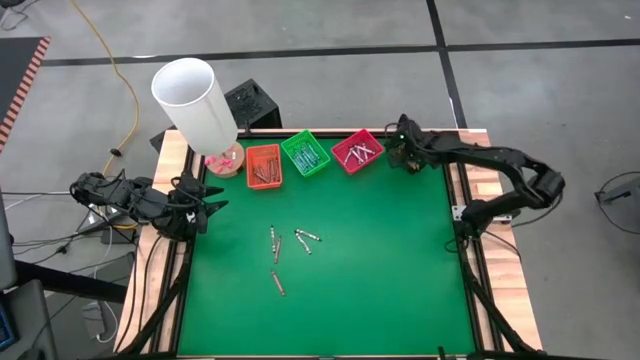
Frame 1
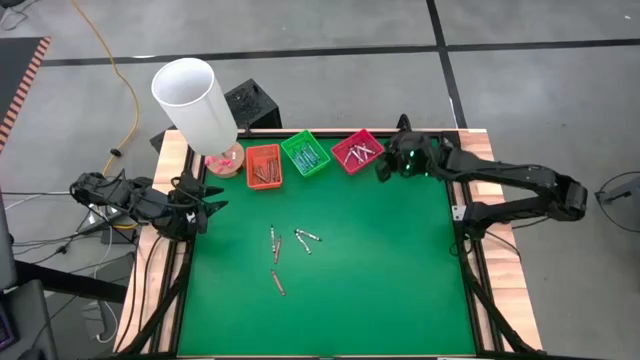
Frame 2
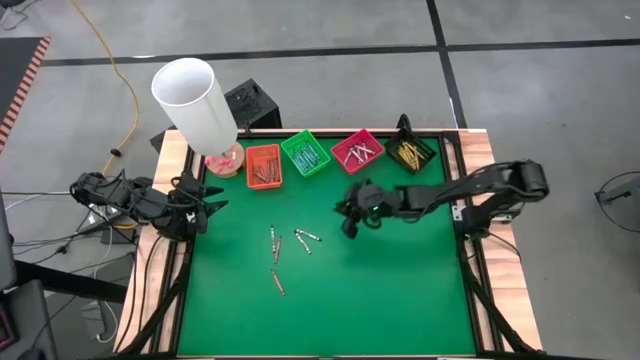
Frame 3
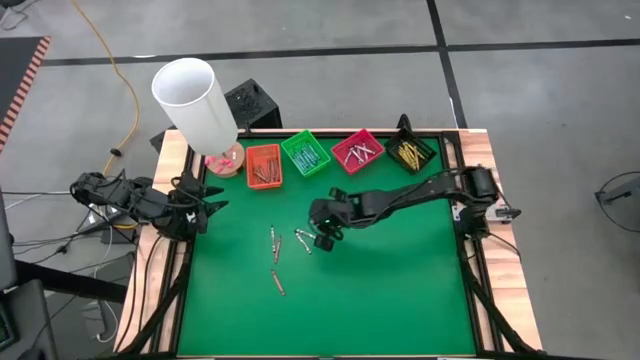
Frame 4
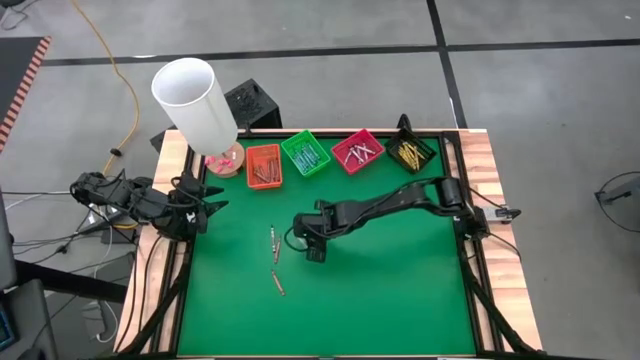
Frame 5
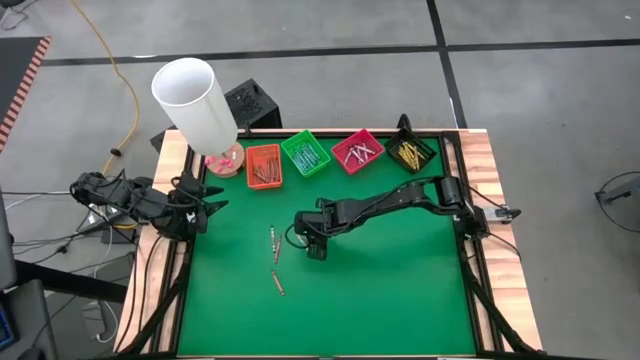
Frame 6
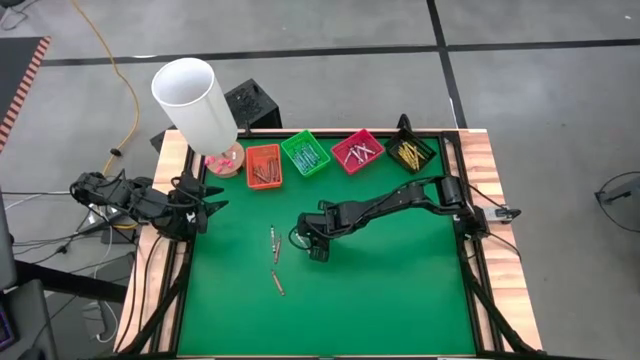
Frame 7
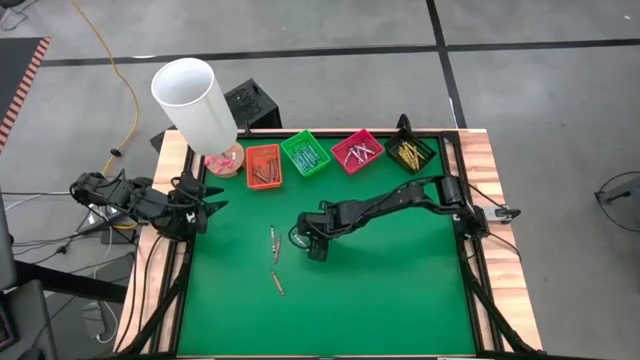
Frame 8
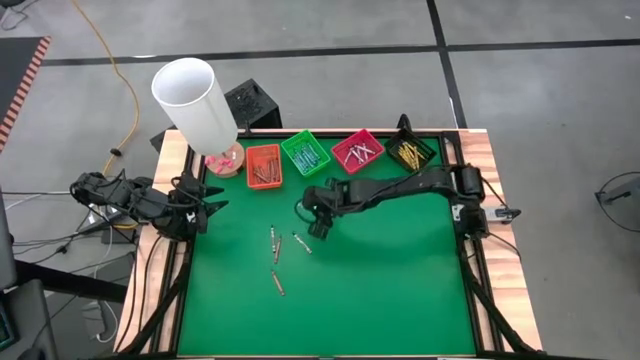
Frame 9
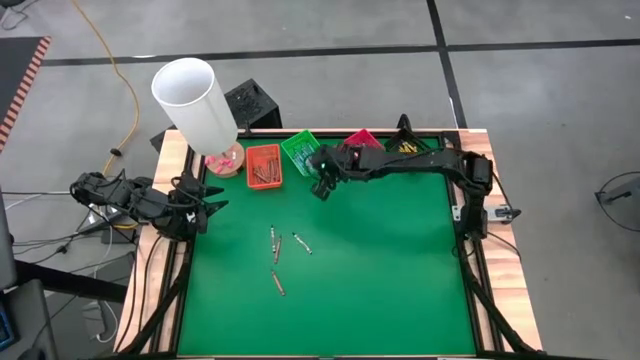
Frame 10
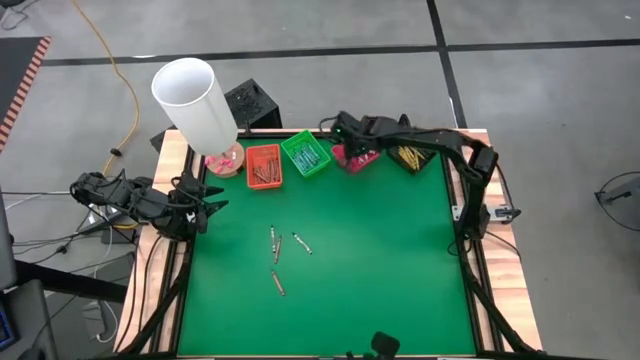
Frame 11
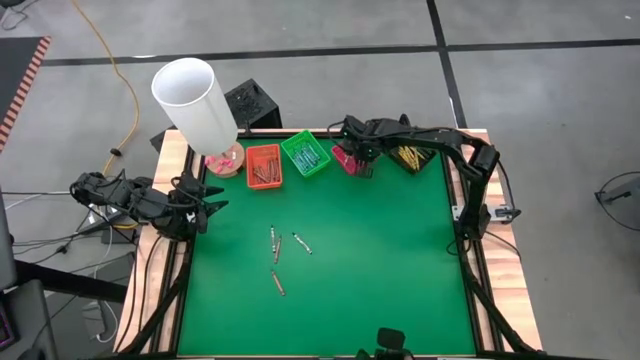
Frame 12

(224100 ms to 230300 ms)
Task: Sort crayons
Put the black crayon into the red bin

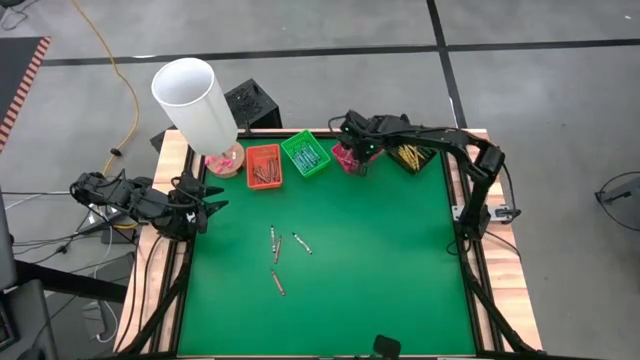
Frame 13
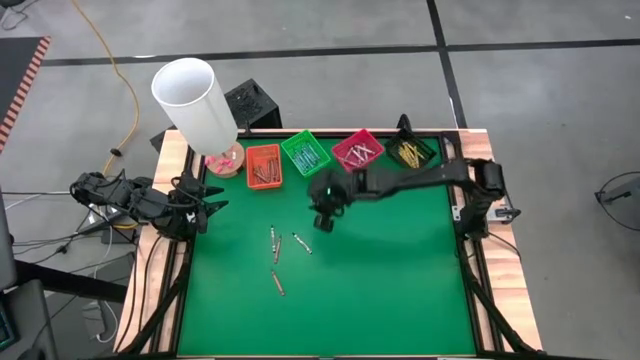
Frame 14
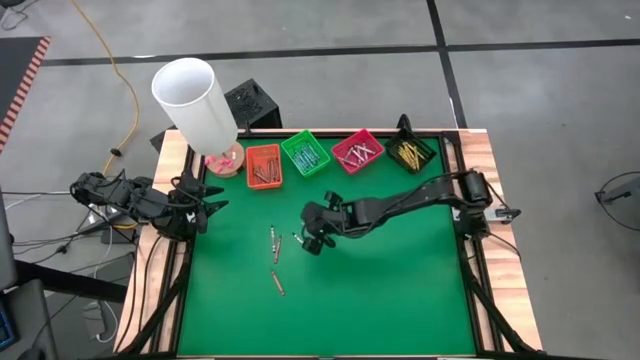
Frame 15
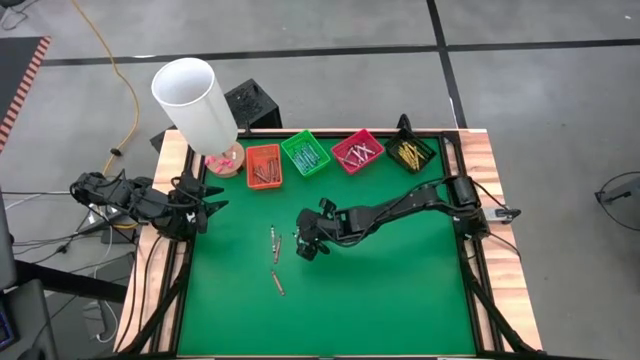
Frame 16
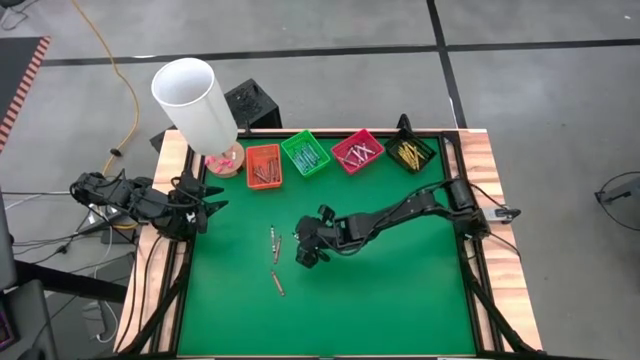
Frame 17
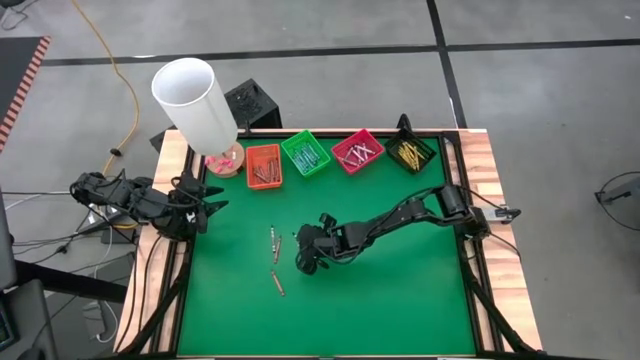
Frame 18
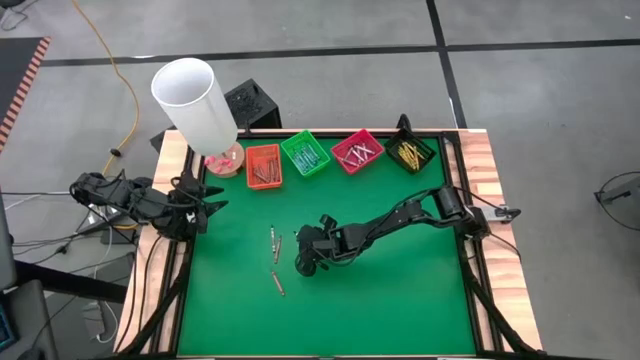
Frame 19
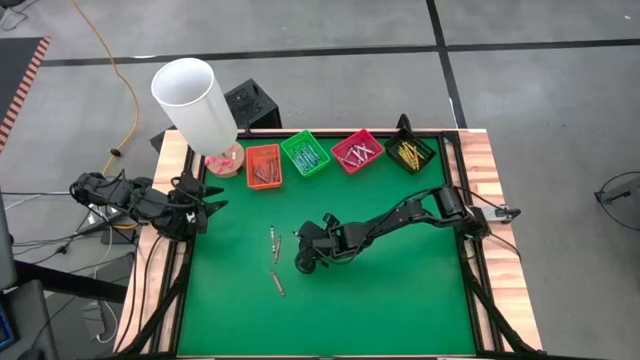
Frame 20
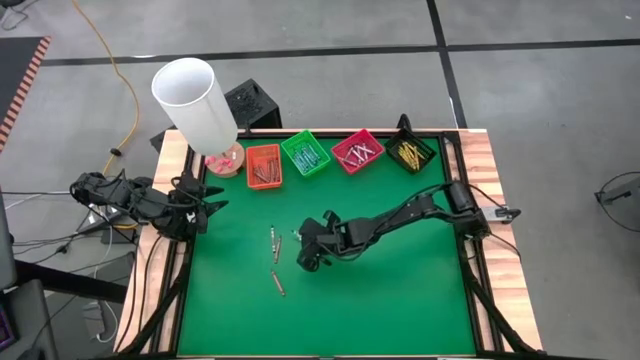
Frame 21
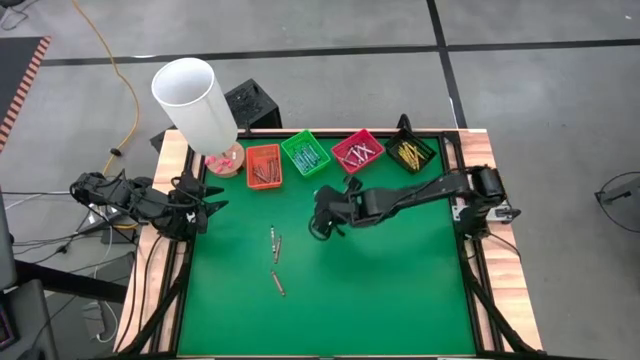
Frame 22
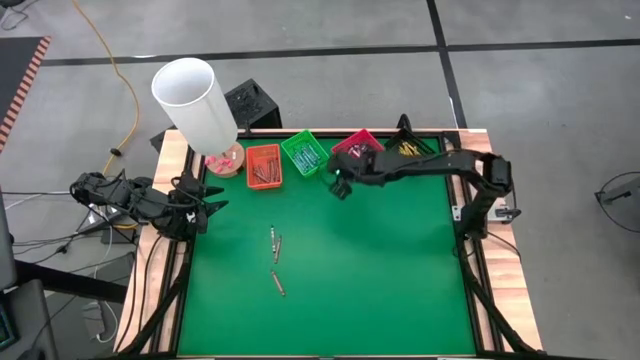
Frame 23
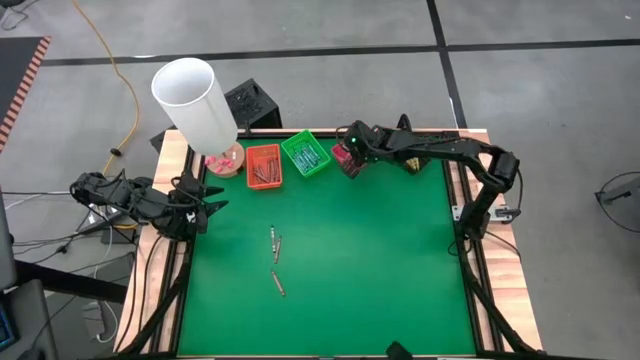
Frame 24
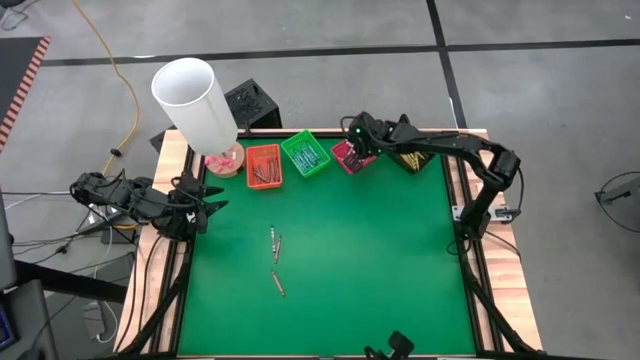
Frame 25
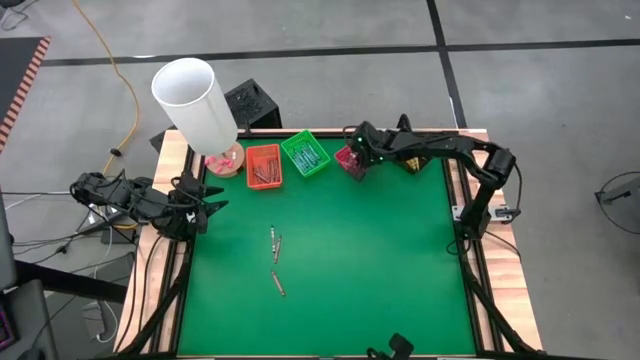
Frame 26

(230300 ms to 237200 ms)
Put the black crayon into the red bin

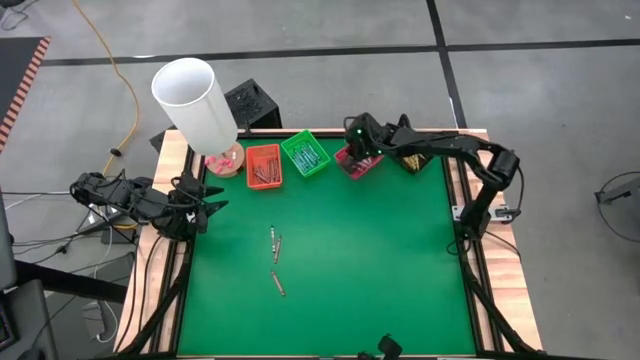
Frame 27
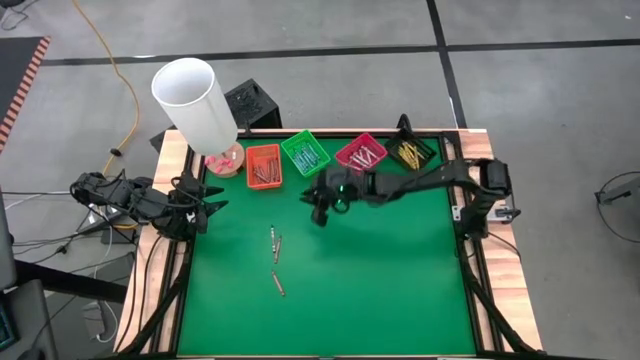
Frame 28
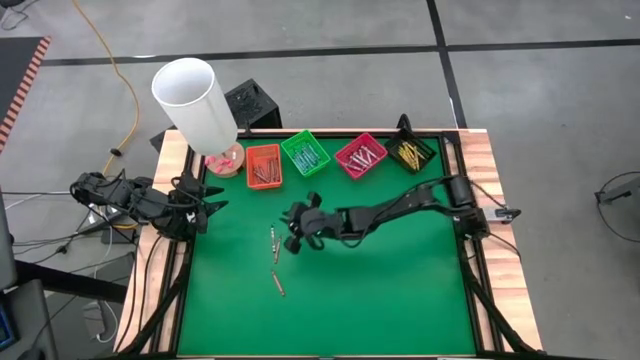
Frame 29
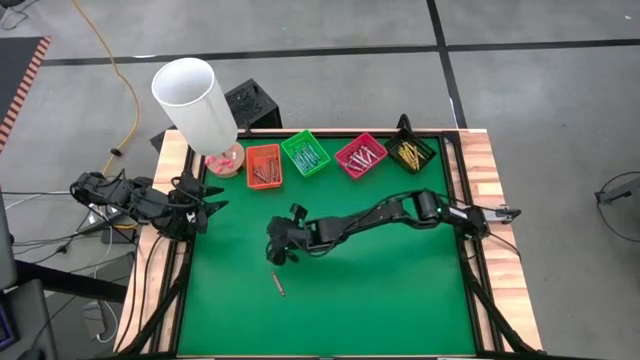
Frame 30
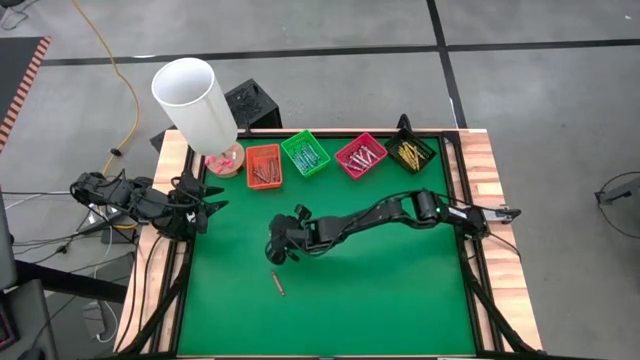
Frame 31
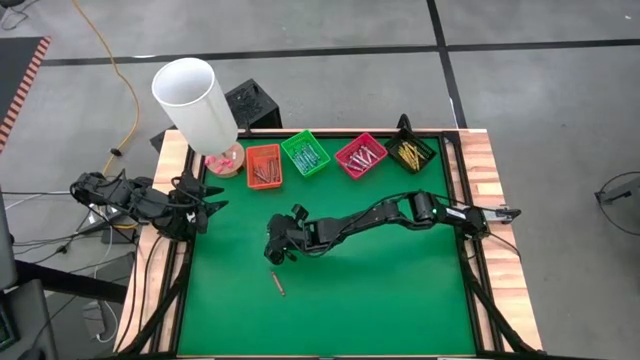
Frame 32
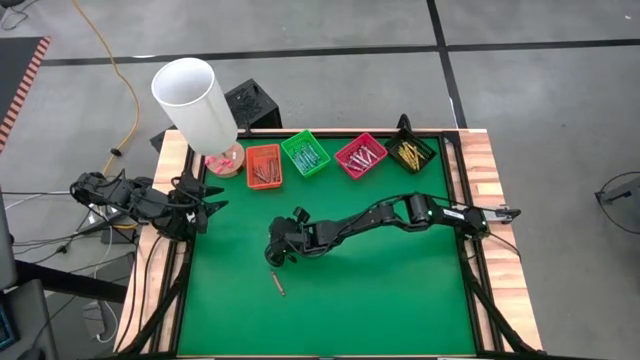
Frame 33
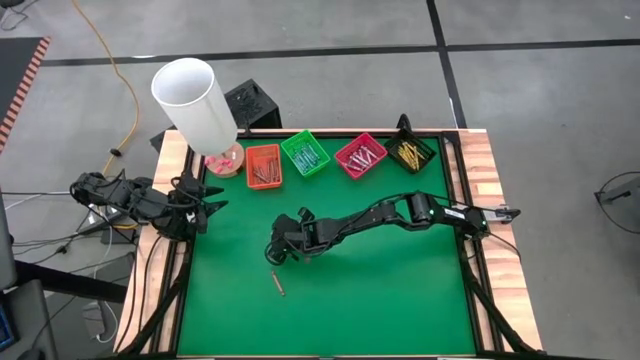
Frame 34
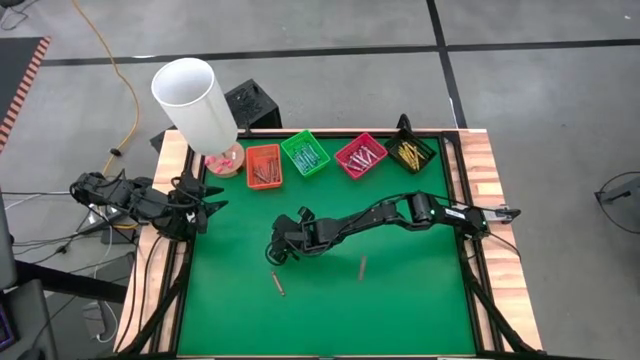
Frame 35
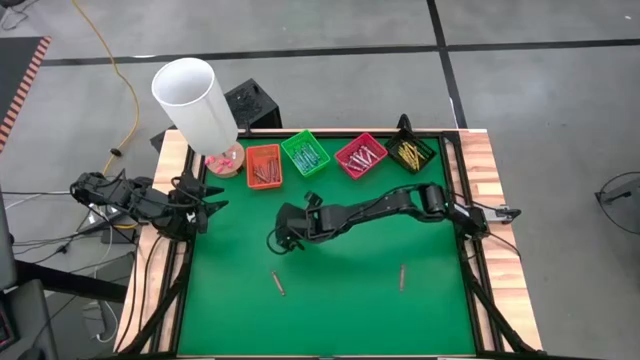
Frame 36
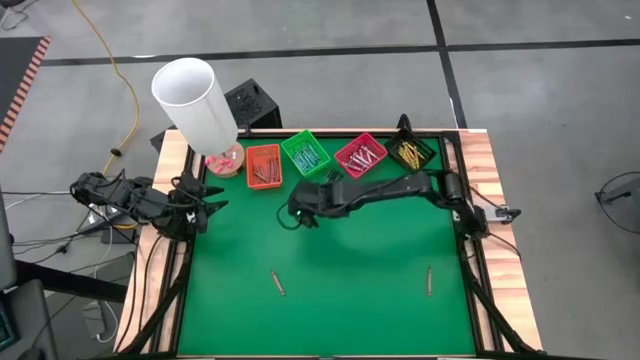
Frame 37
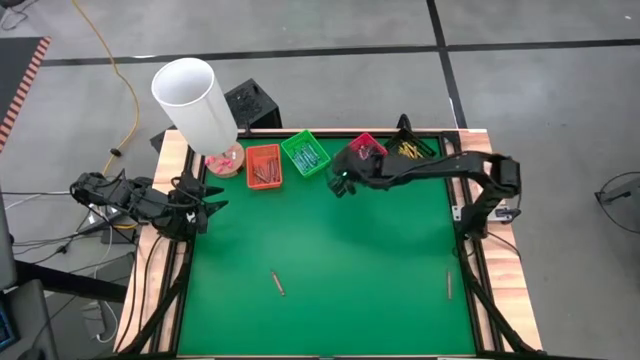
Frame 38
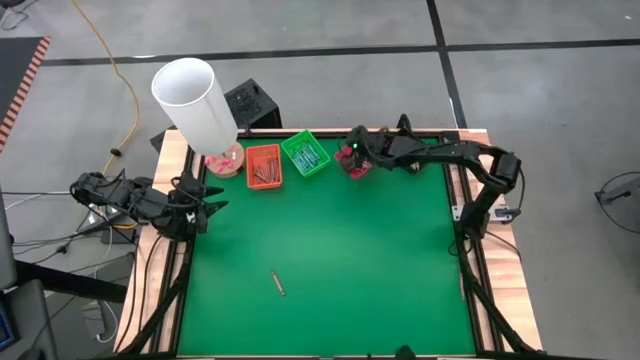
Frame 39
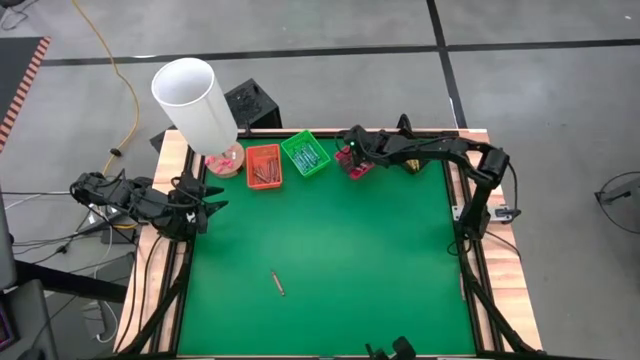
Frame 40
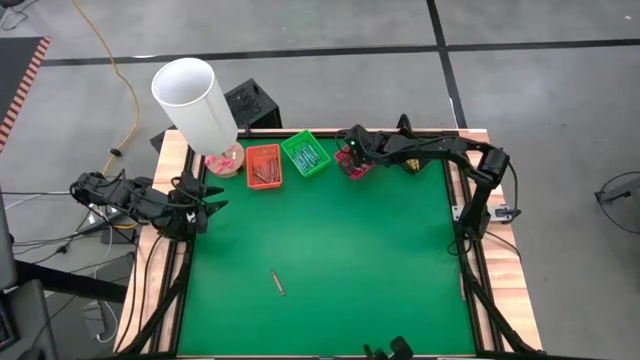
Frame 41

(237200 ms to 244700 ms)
Put the black crayon into the red bin

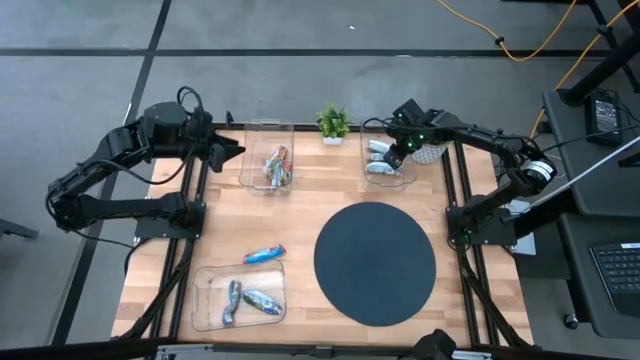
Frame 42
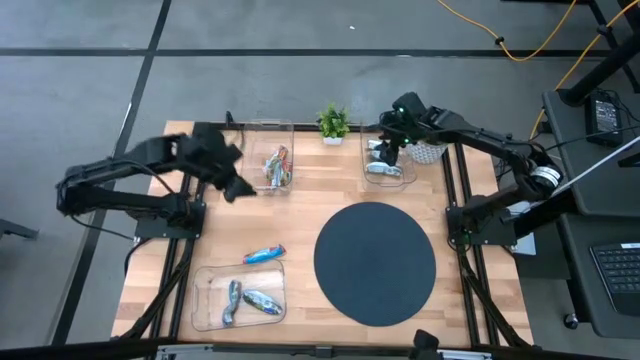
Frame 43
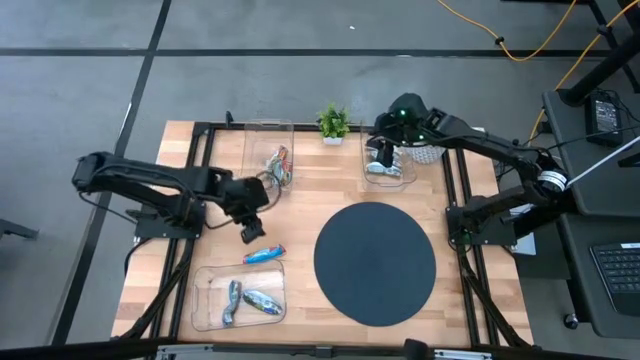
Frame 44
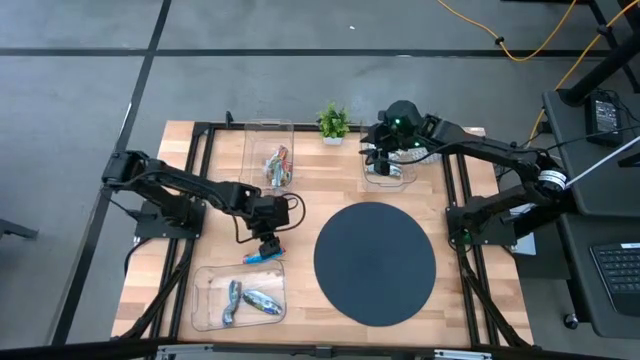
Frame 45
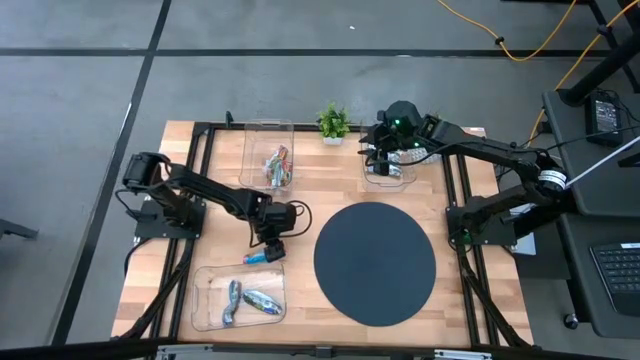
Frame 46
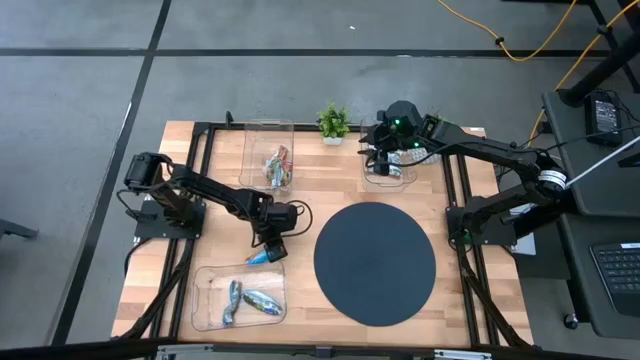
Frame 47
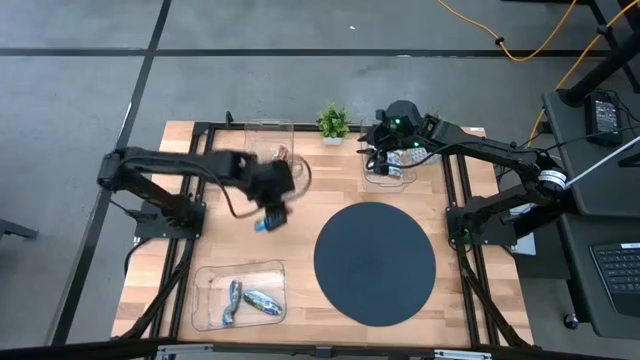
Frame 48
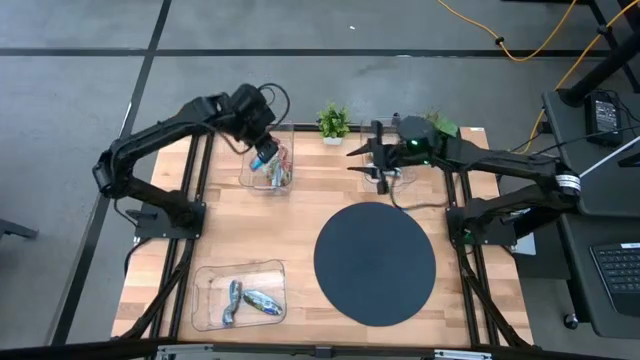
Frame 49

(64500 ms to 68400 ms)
Task: Pick and place Granola Bars by type
Put the red granola bar into the top left transparent bin
